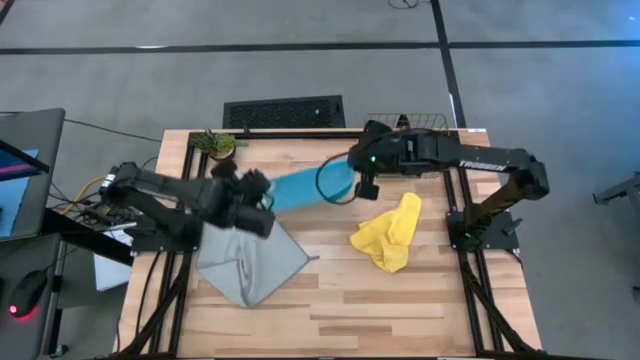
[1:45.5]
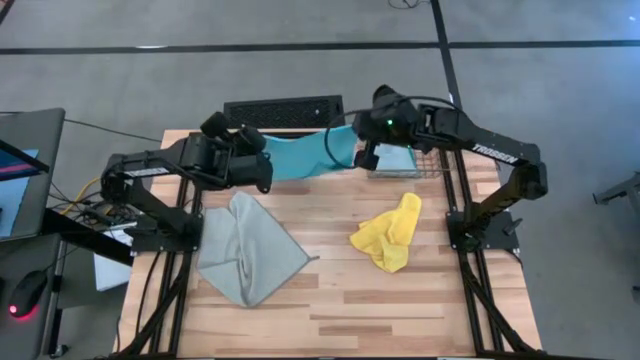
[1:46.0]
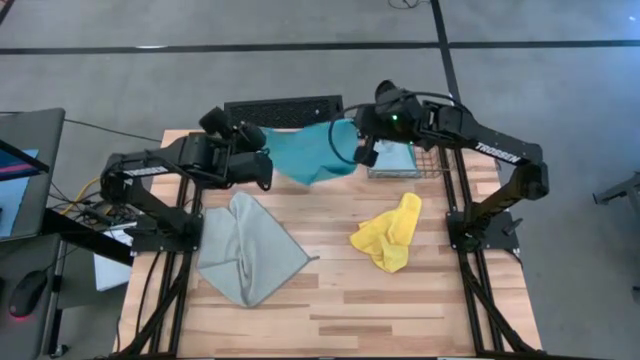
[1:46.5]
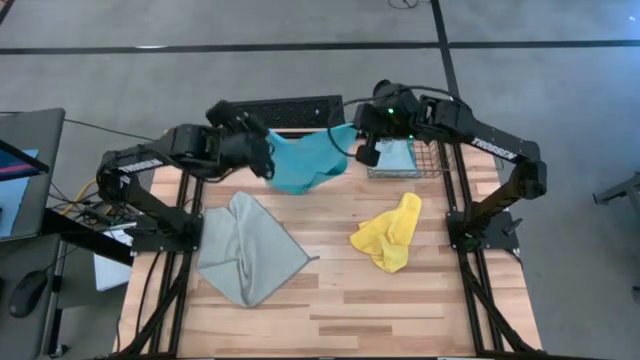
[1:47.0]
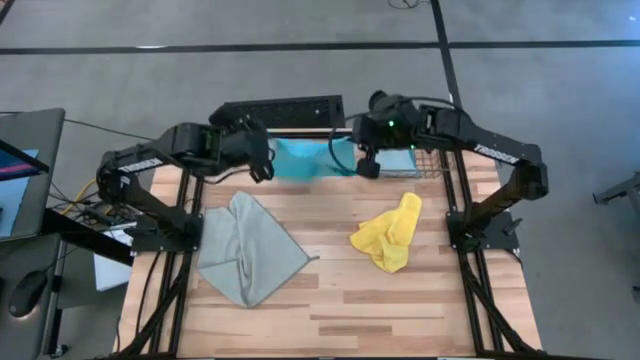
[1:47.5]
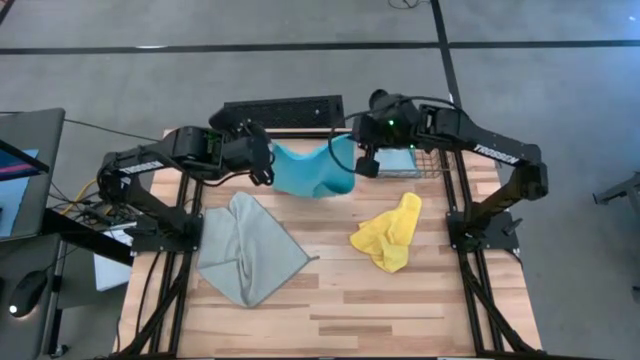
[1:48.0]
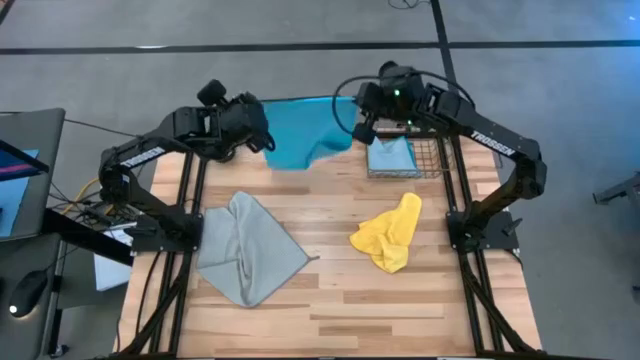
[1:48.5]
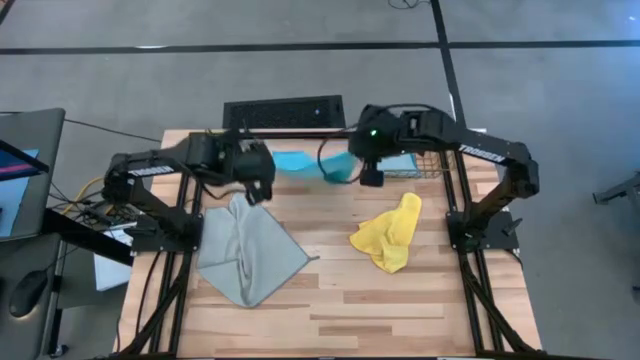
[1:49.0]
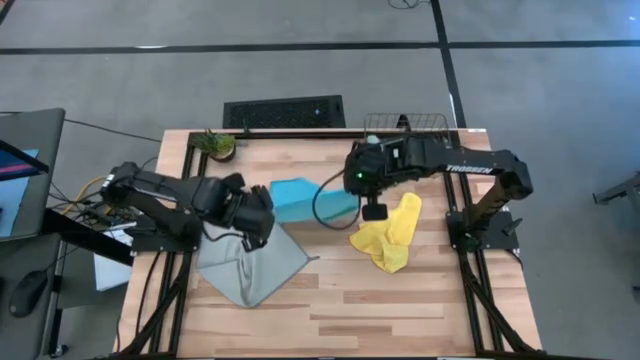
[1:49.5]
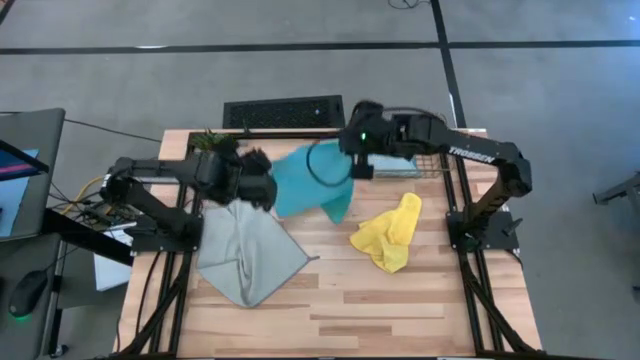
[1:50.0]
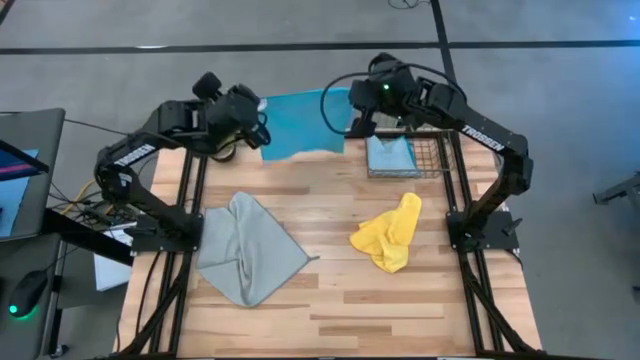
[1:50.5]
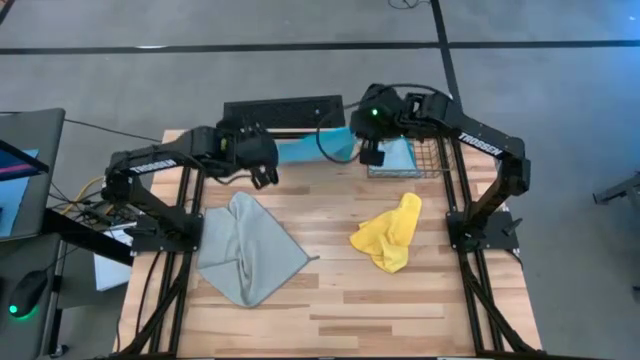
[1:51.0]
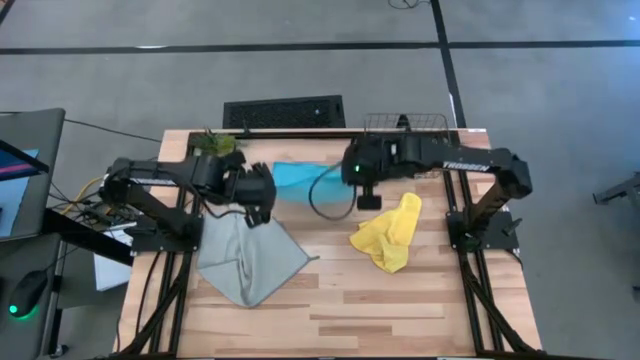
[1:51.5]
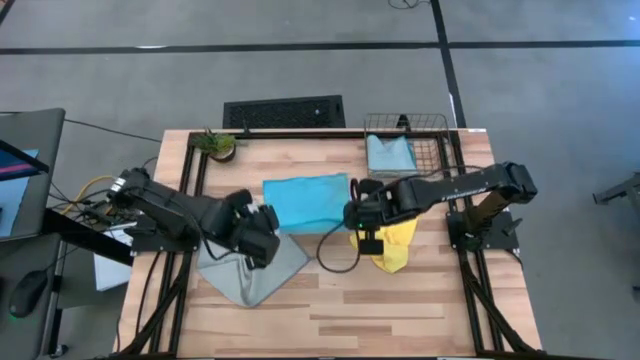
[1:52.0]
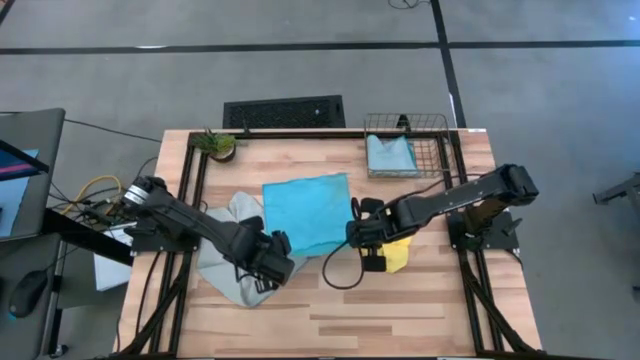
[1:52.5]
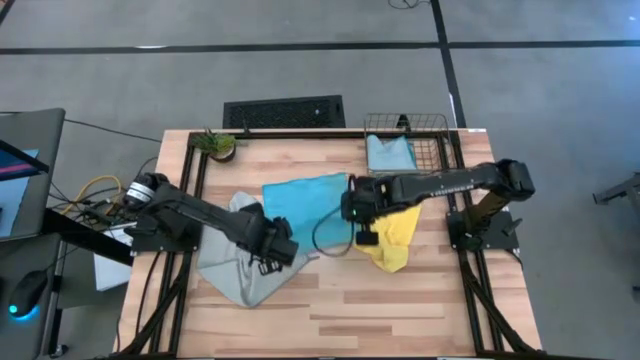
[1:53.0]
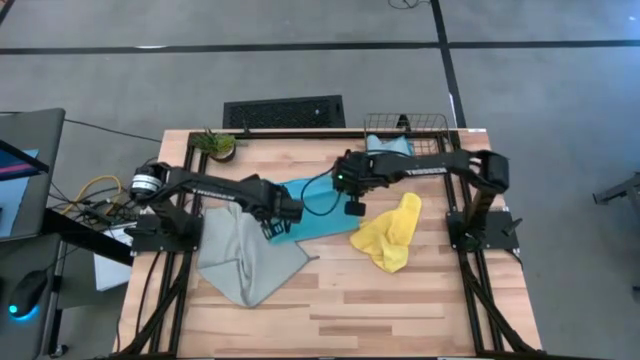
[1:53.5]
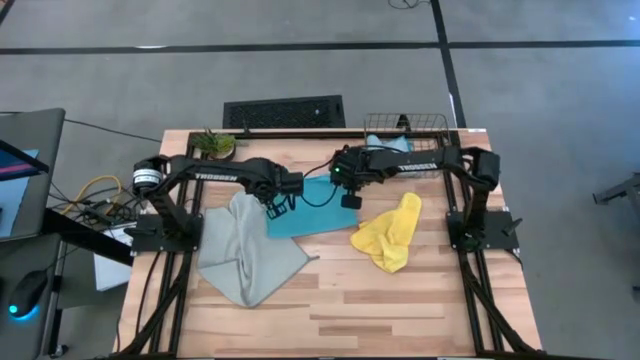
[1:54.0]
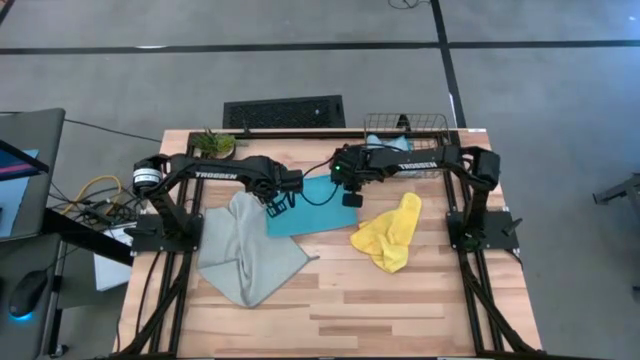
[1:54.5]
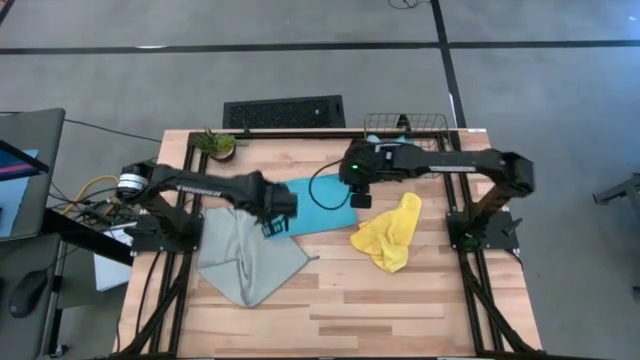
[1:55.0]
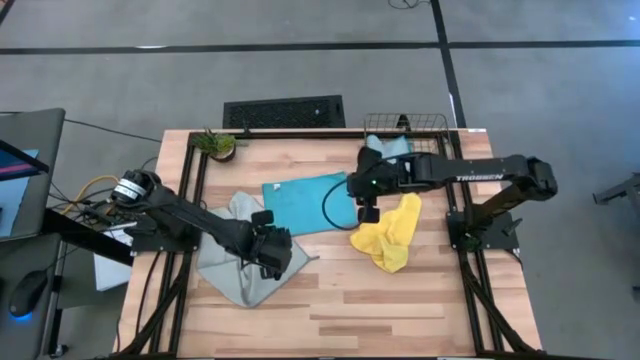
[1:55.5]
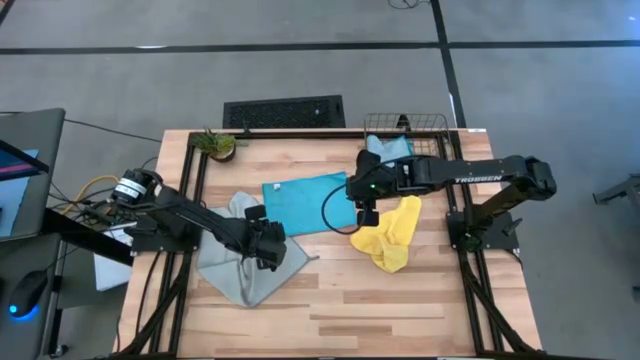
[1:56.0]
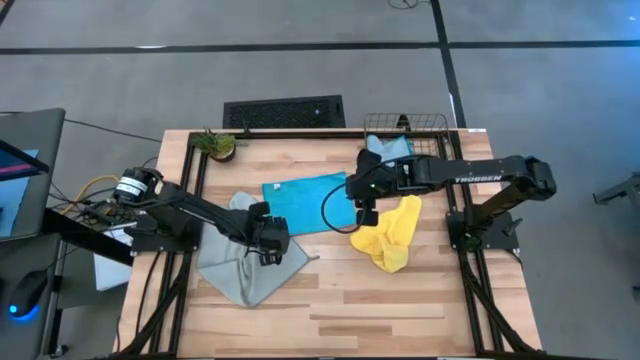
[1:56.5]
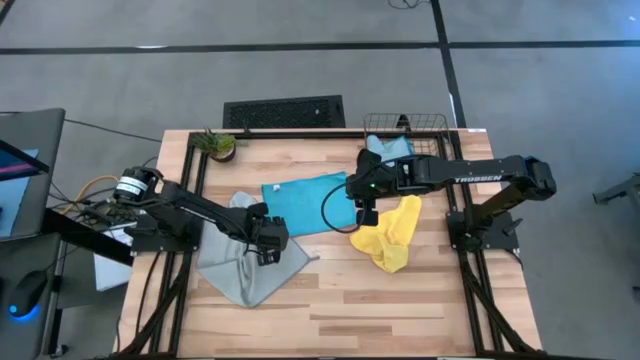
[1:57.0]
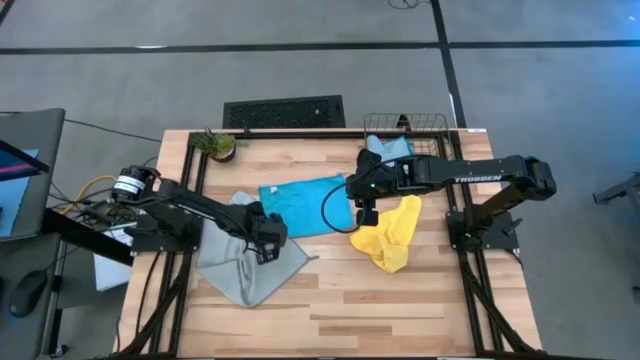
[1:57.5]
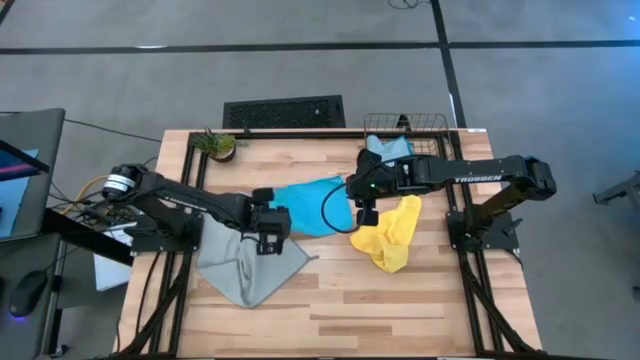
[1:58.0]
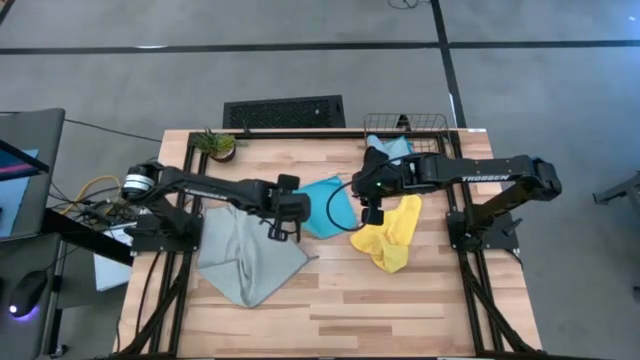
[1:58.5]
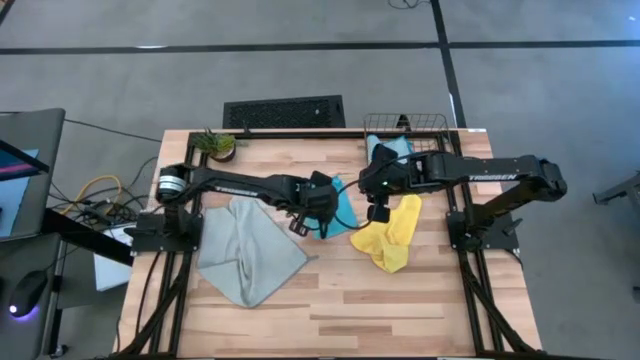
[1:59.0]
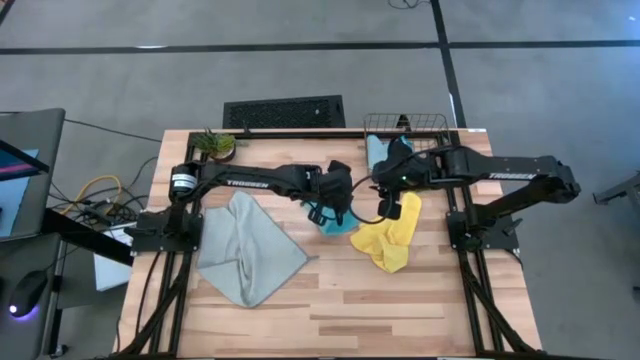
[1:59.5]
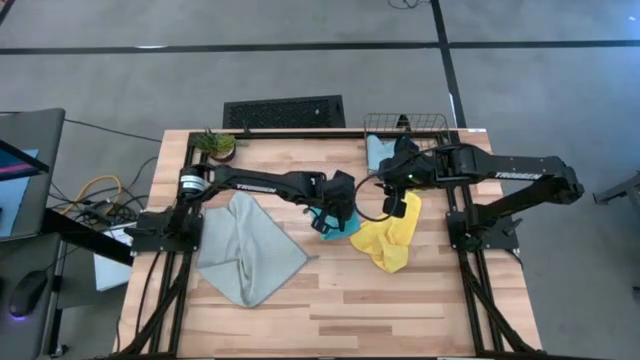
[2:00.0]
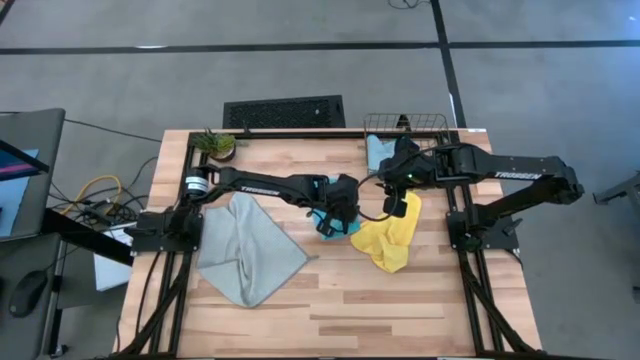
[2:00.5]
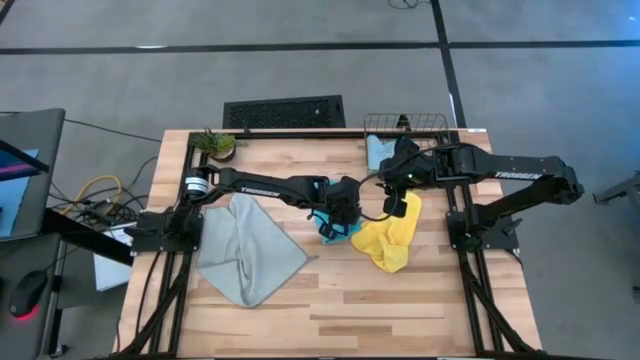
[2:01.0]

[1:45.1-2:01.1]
Task: Fold microfiber towels
Fold the blue microfiber cloth

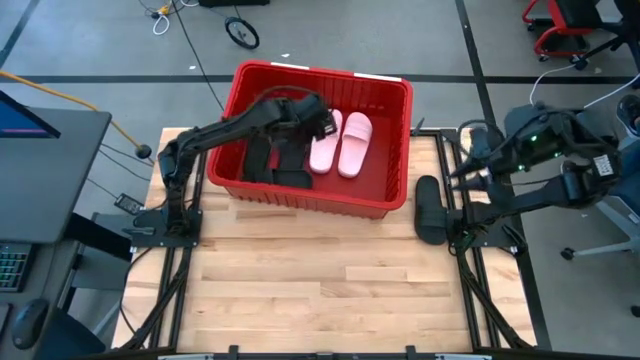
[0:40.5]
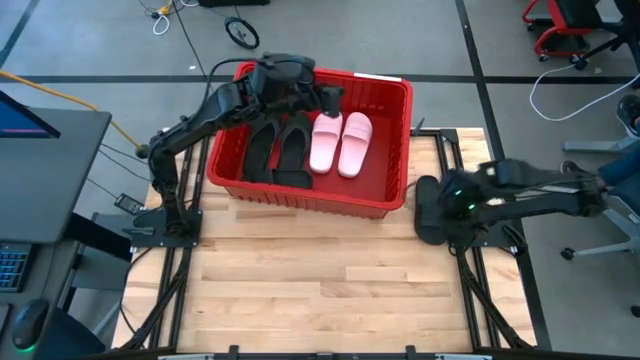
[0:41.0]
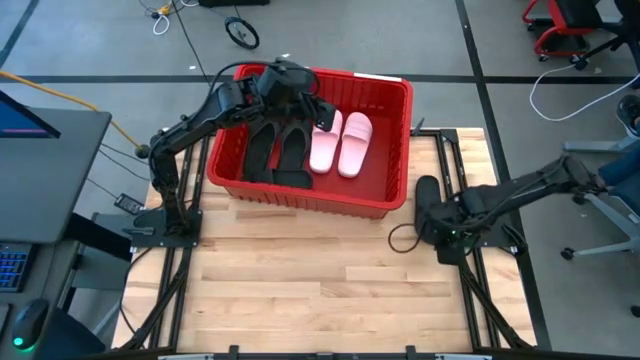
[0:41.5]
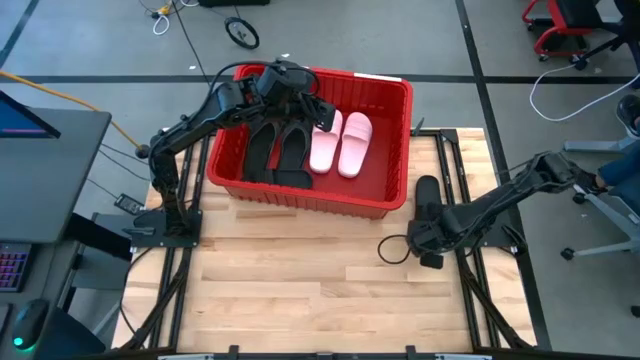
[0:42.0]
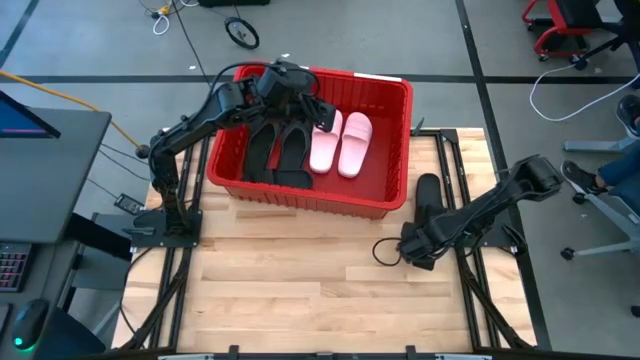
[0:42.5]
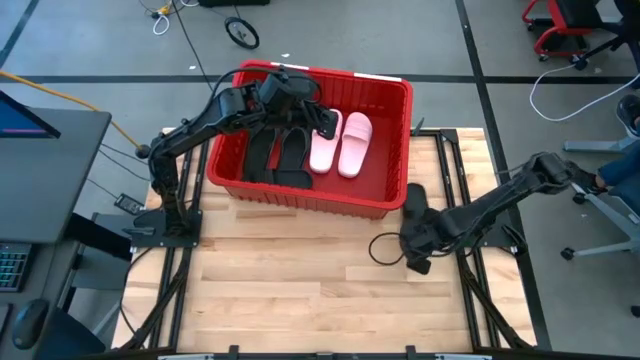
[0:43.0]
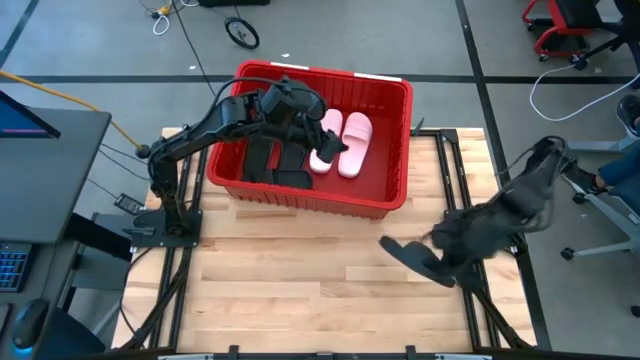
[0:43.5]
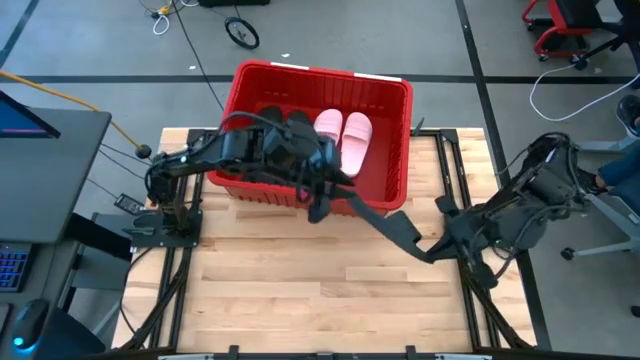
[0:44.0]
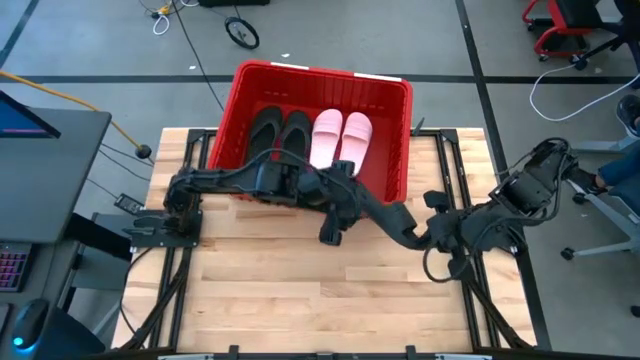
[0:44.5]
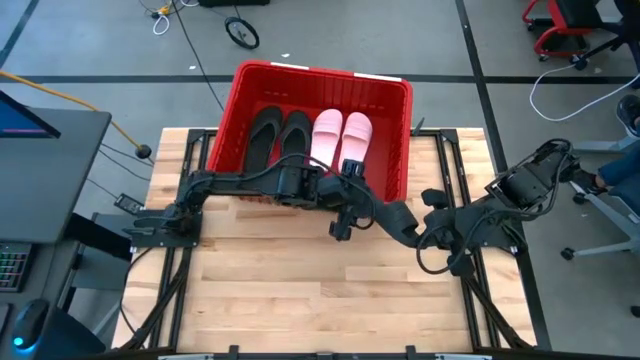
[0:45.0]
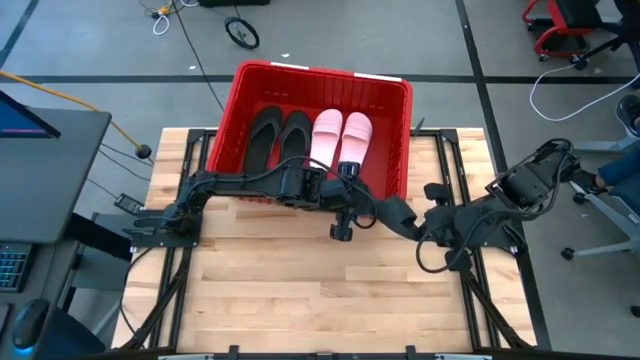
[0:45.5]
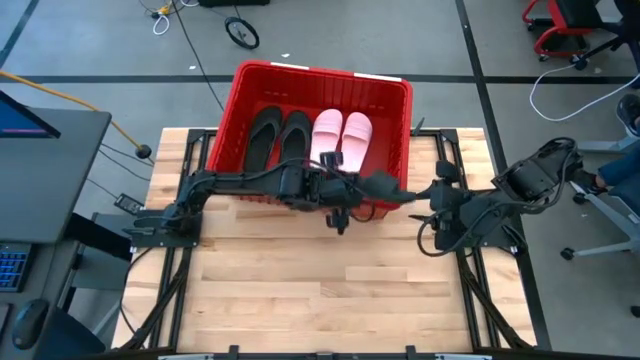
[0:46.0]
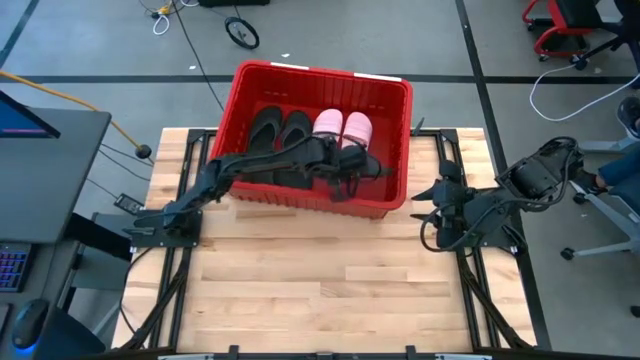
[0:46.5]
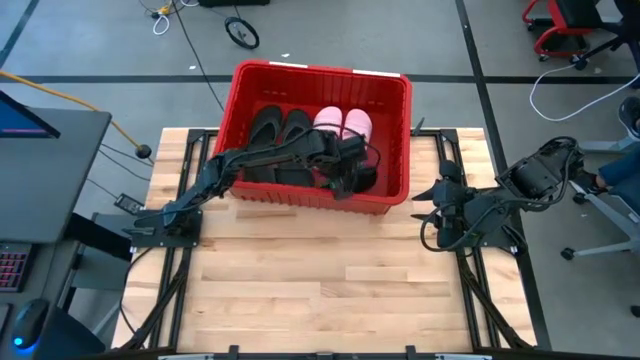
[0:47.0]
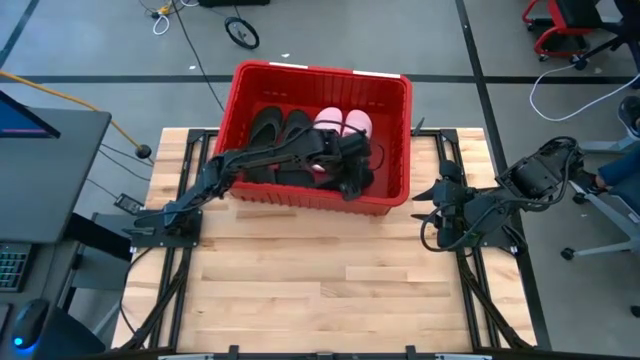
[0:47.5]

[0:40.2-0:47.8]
Task: Pick and place slides into bin
Put the black slipper into the red bin
